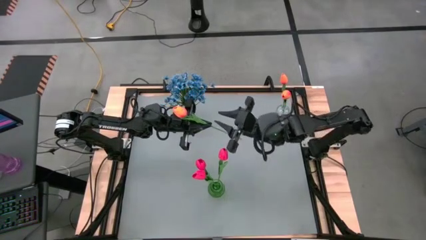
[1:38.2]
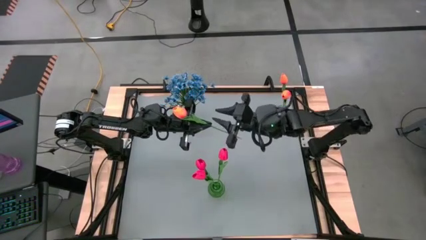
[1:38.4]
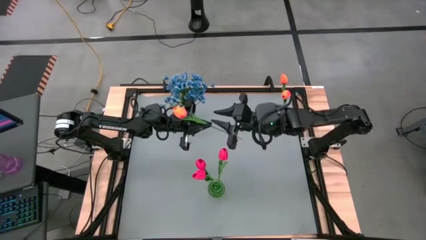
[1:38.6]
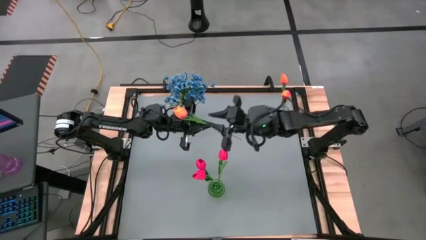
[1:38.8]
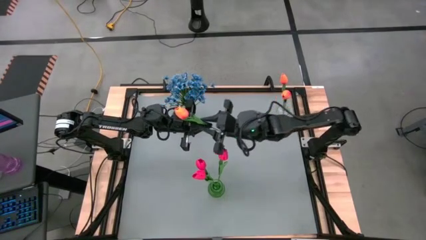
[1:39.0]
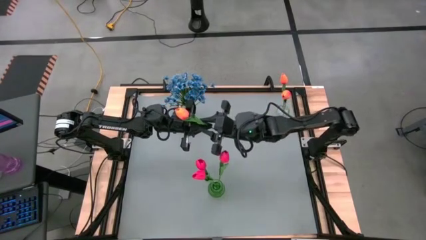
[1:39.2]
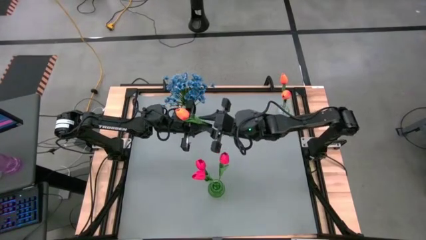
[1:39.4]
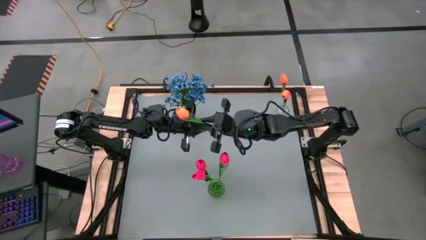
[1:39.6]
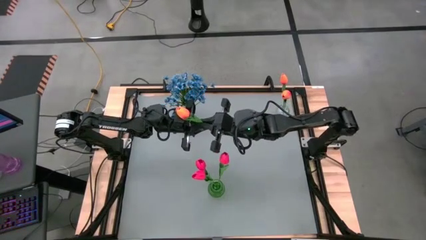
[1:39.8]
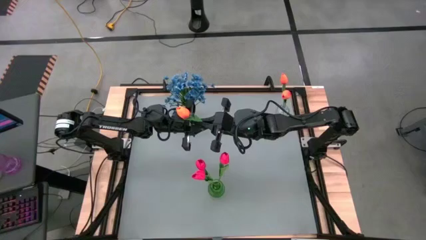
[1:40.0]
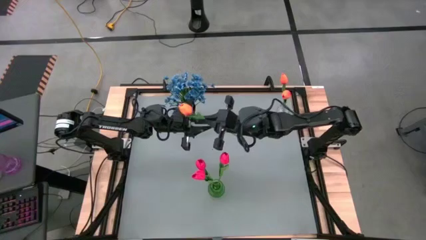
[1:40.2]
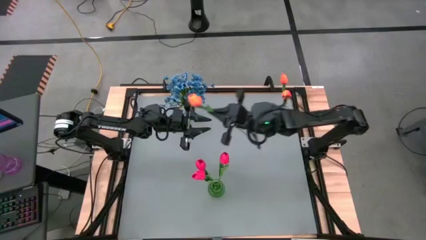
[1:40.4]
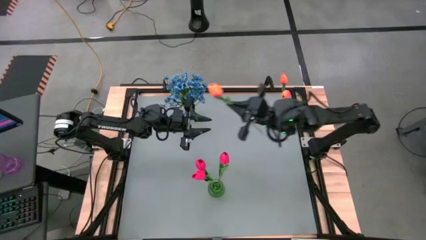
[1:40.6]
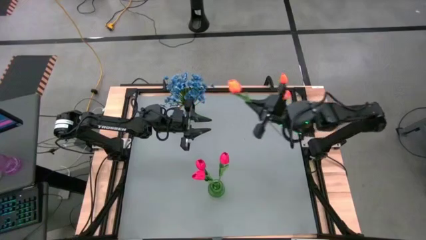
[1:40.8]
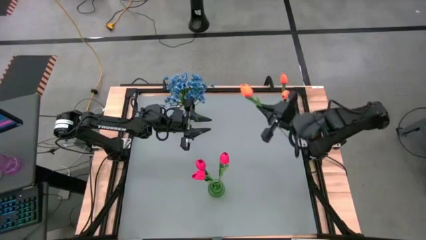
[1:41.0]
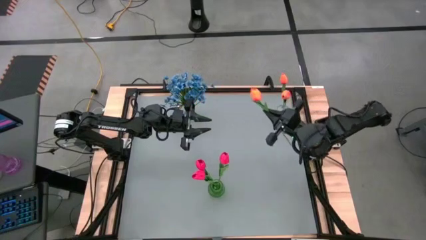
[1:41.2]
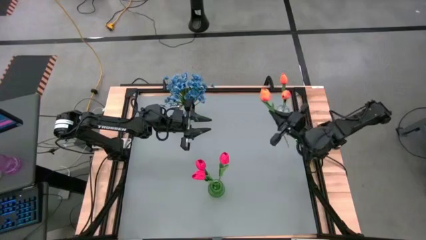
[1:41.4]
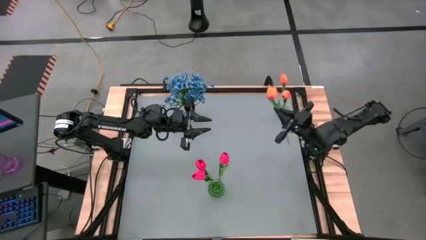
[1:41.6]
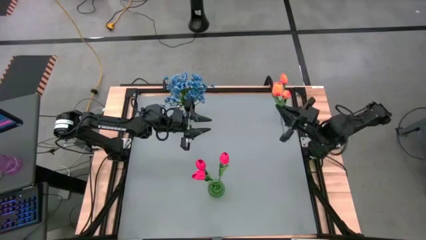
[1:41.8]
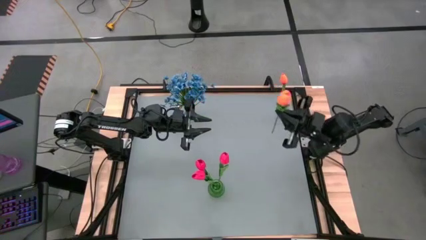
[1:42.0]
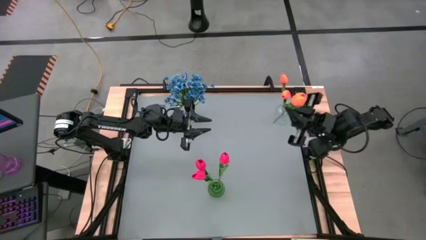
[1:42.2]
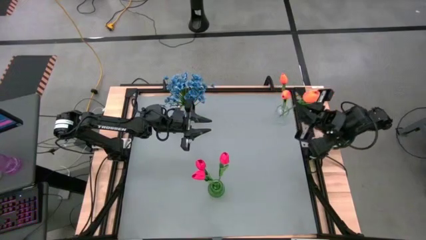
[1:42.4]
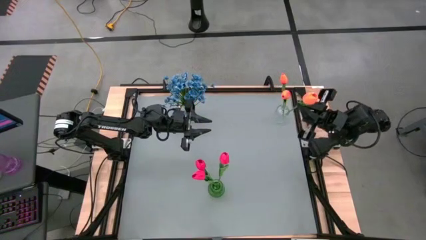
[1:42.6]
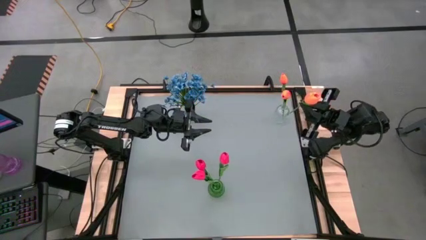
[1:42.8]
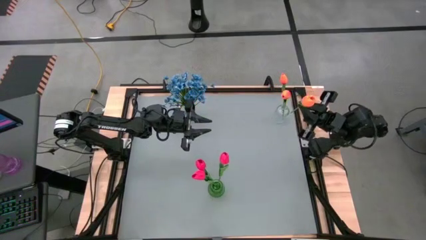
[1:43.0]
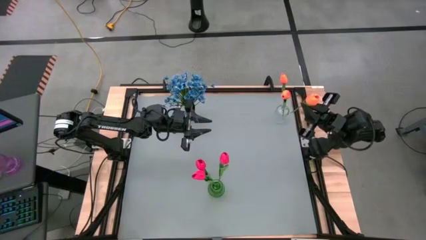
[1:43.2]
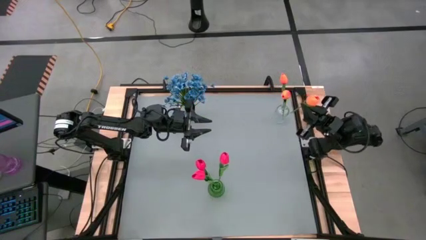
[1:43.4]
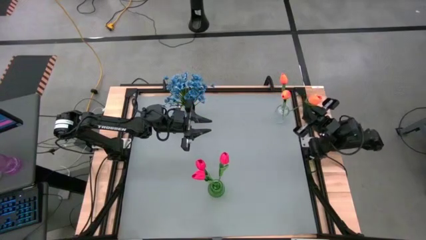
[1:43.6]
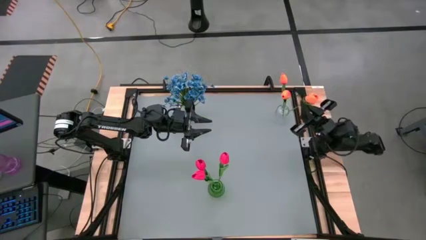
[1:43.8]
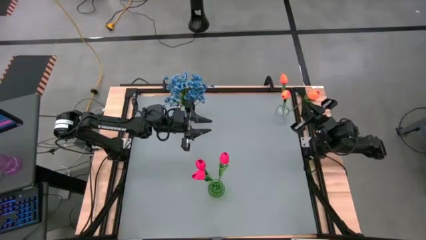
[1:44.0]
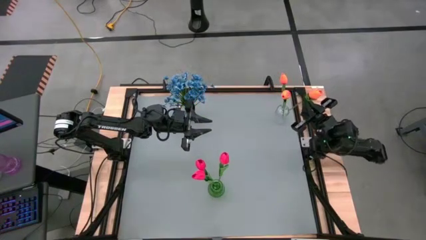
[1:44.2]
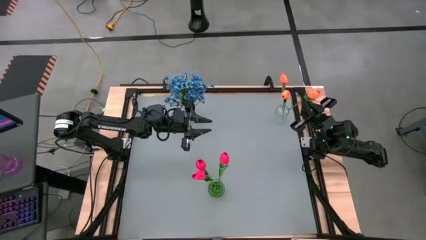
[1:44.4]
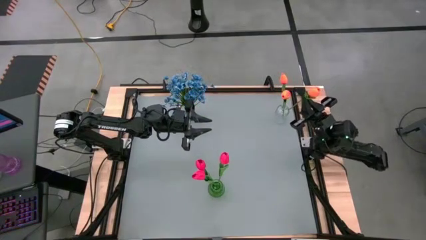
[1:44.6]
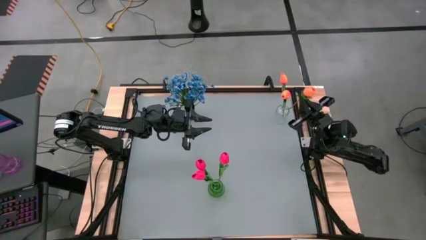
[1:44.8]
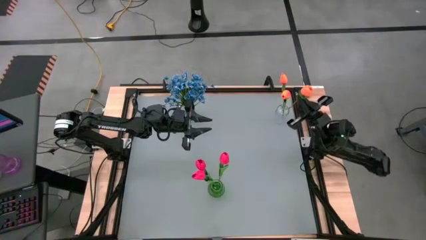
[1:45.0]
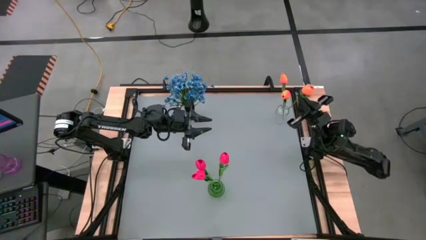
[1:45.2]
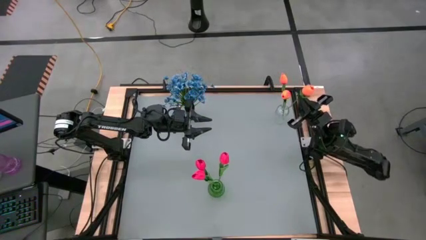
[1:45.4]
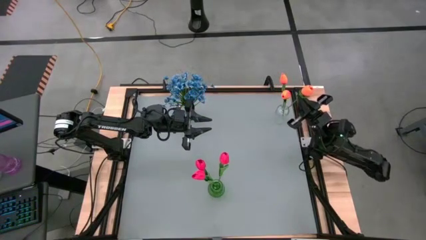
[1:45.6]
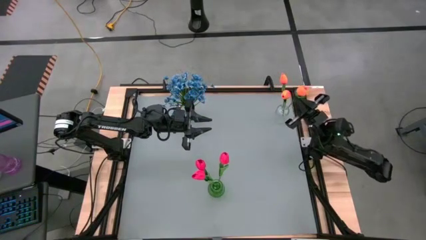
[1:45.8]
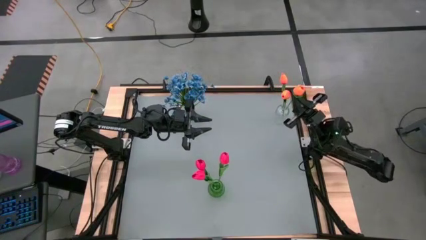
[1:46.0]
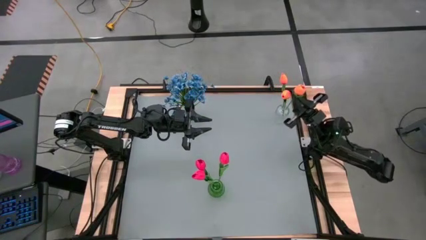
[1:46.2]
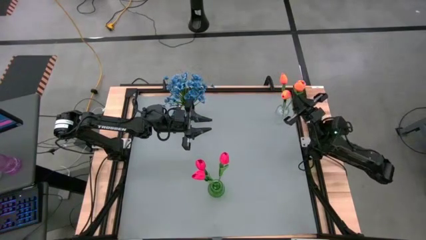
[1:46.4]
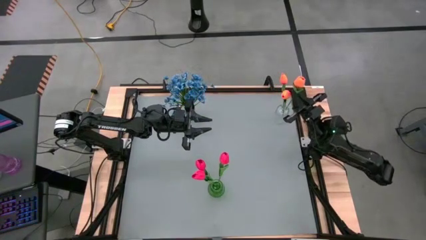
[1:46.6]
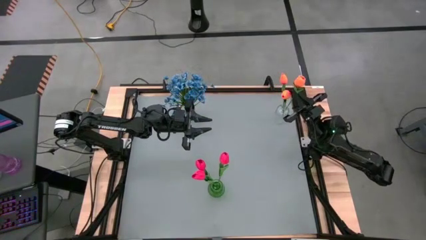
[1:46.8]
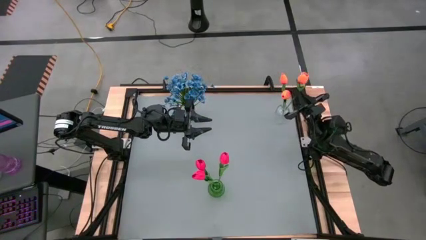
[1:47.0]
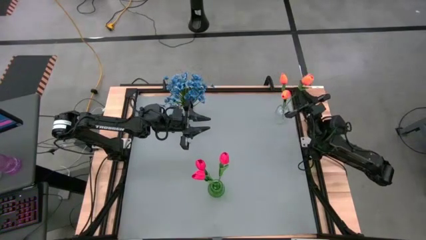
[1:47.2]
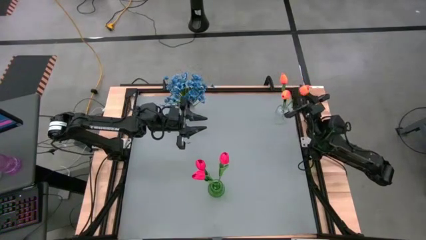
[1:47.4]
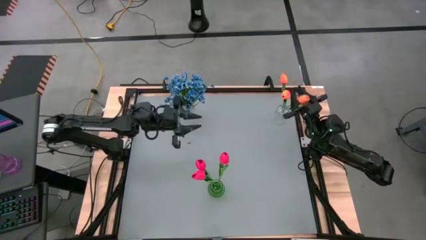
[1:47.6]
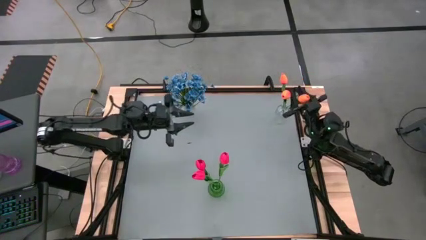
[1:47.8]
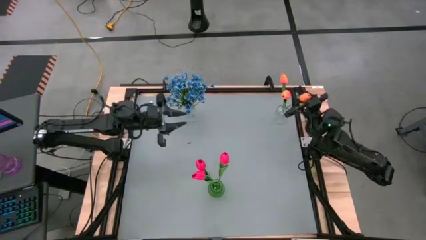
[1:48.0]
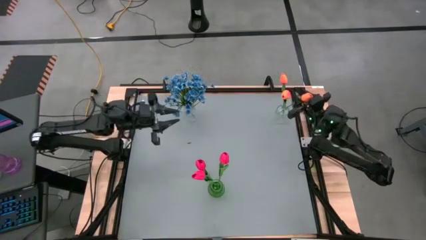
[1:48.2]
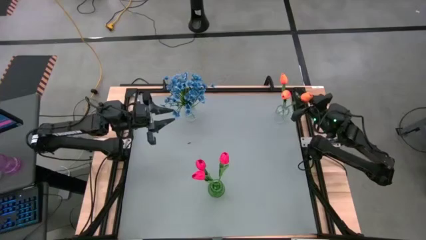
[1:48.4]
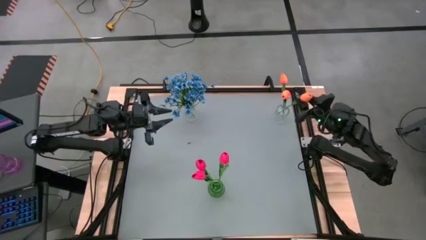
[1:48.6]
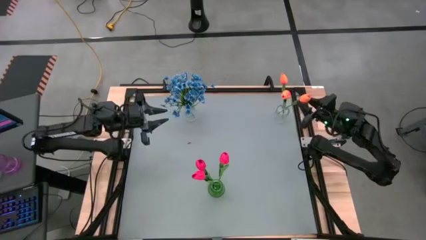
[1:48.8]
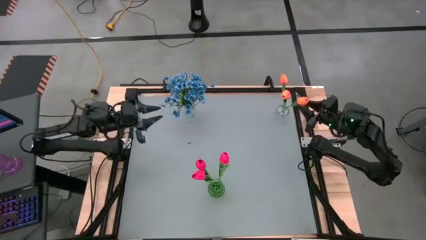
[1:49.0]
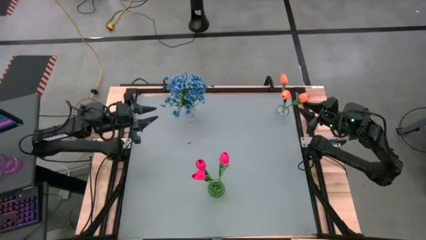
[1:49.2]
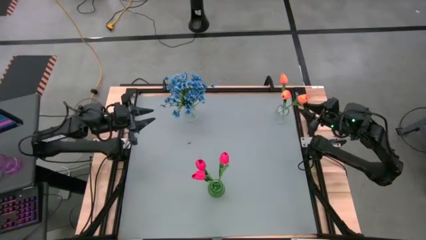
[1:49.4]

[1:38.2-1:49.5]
Task: Sort flowers into vase by color
Put the orange tulip into the top right transparent vase

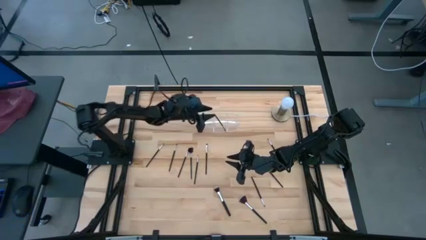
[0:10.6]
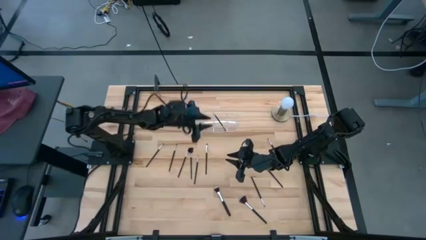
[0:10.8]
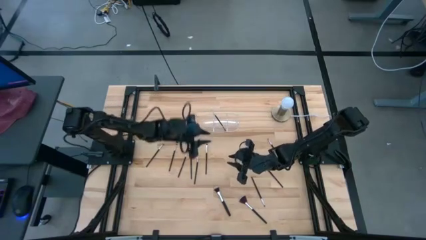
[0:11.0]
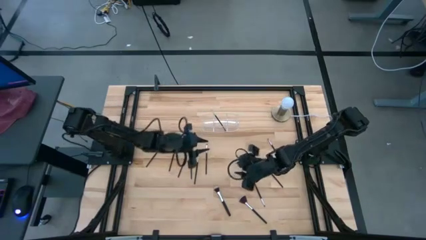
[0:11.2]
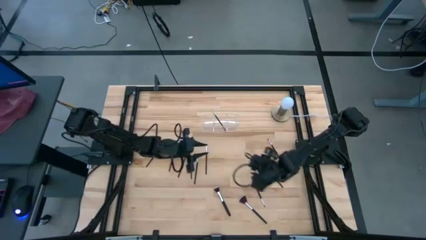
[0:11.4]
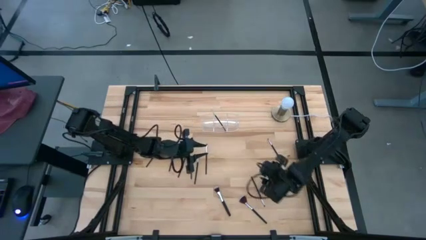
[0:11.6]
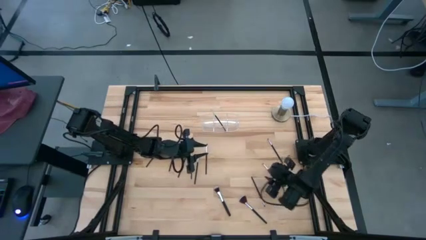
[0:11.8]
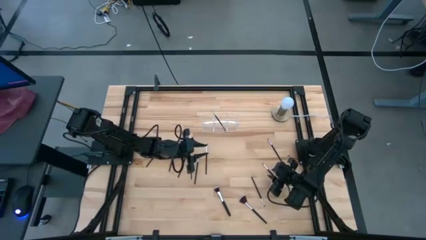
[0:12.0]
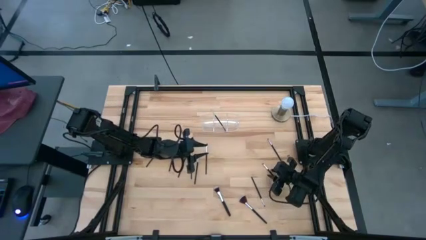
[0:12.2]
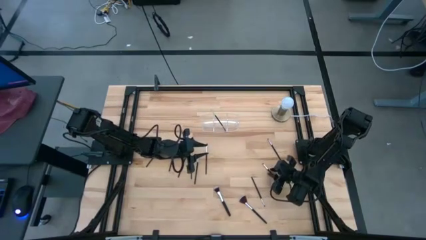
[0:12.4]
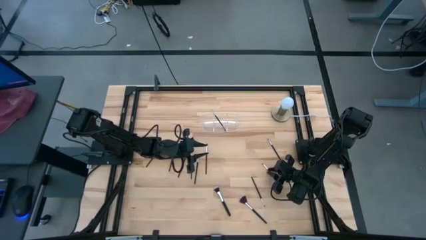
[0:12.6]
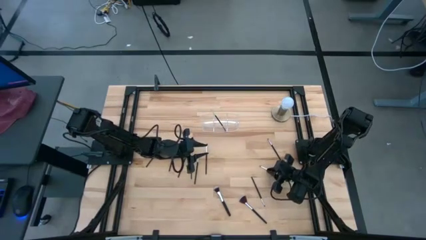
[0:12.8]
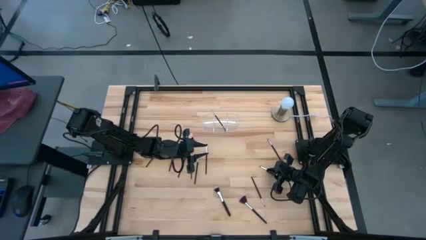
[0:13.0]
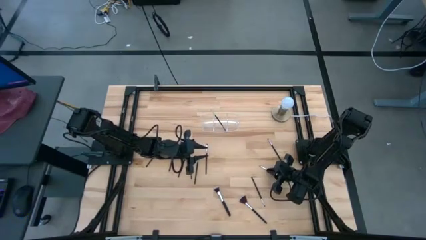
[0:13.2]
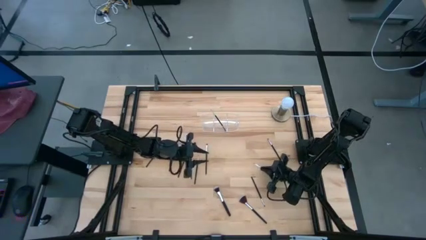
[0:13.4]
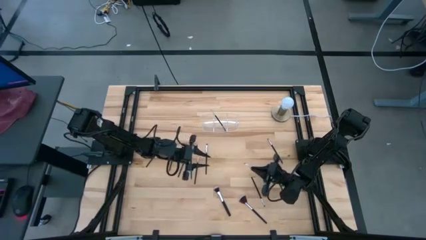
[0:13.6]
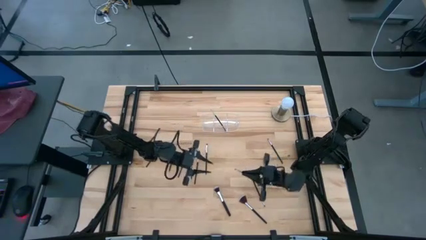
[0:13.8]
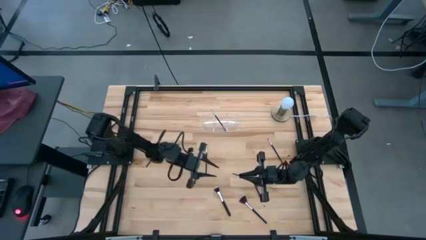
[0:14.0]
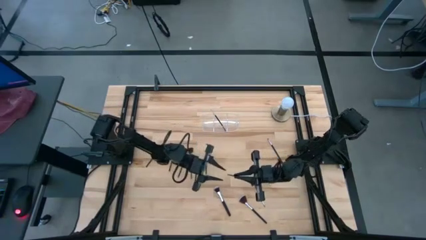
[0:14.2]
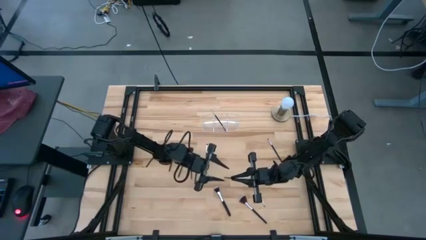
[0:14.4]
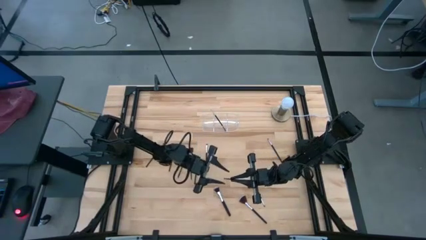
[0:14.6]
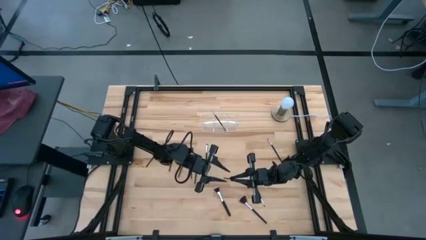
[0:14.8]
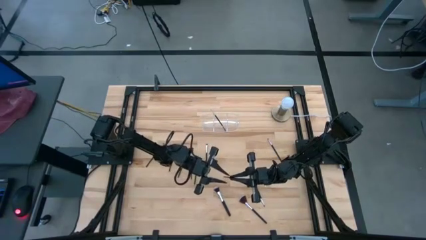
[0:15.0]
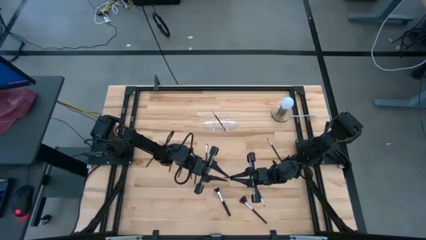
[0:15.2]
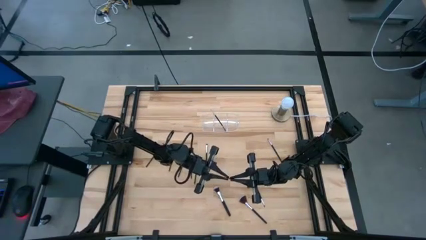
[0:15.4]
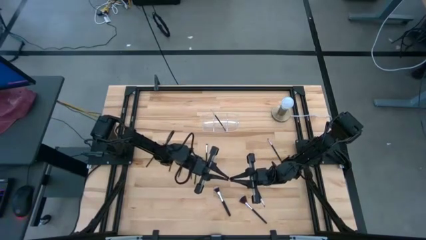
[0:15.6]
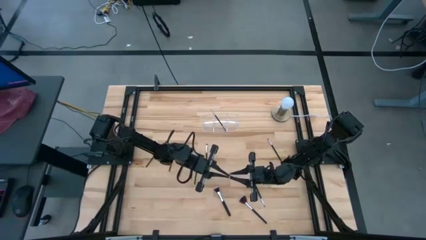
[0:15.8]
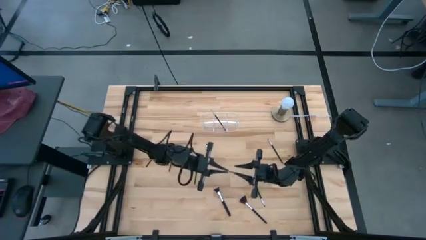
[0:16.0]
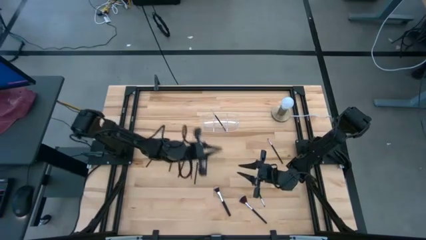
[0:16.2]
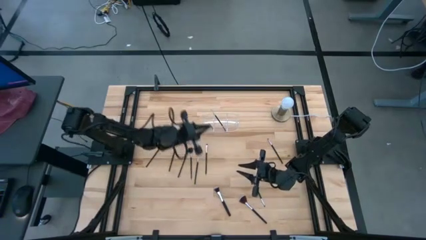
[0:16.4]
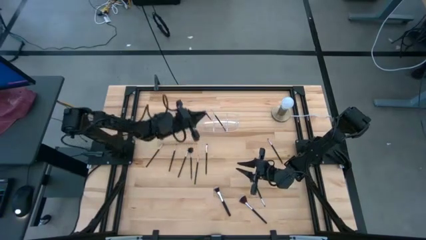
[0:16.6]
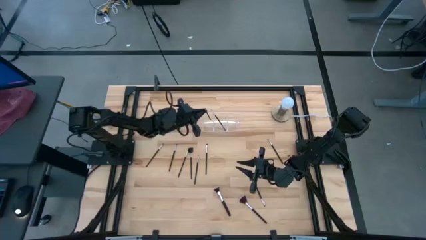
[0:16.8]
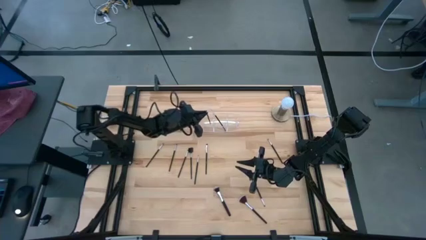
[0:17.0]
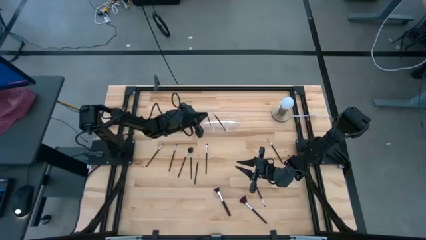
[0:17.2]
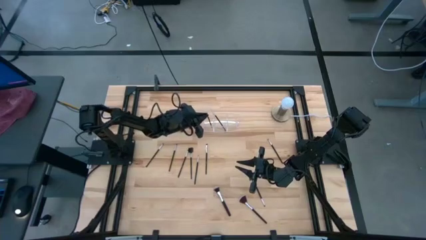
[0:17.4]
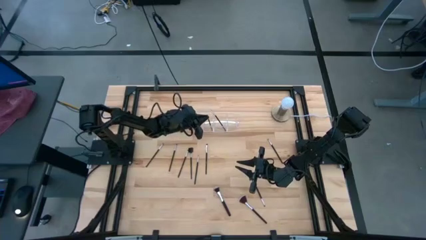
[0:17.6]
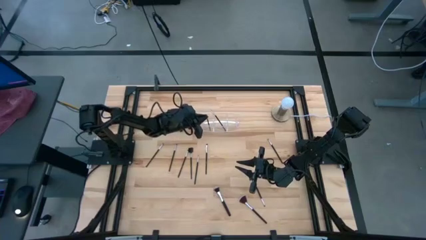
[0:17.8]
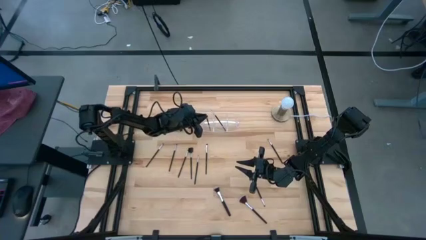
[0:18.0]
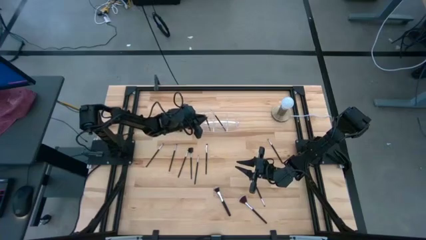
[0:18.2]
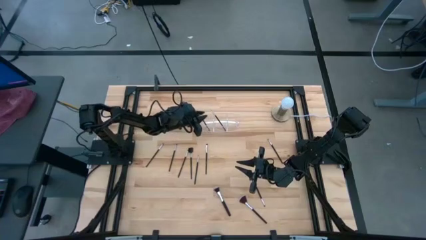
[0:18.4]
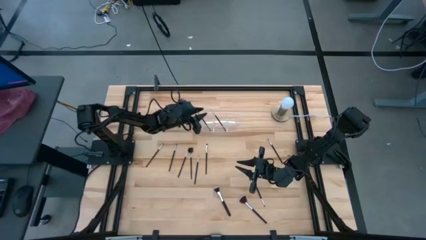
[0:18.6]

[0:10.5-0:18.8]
Task: Put items in baskets/containers
Put the black eyeshadow brush into the transparent organizer
